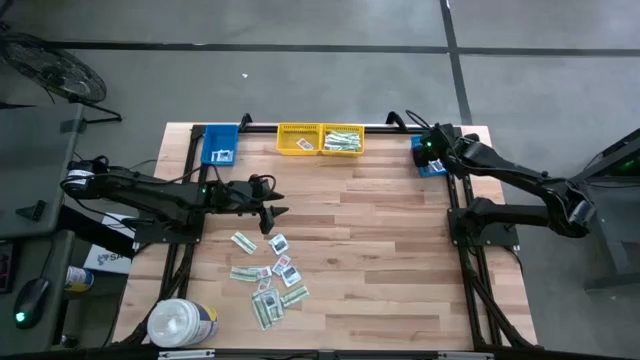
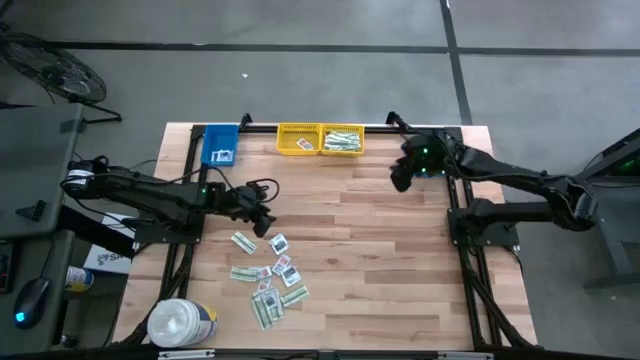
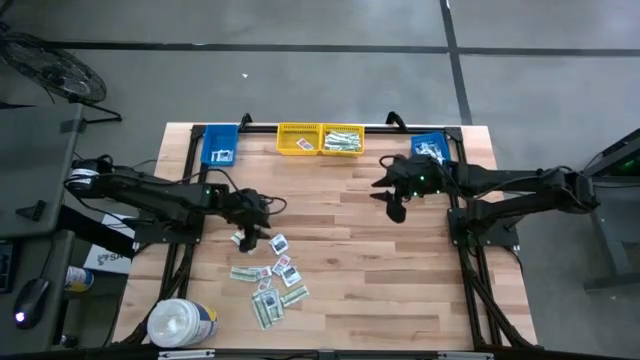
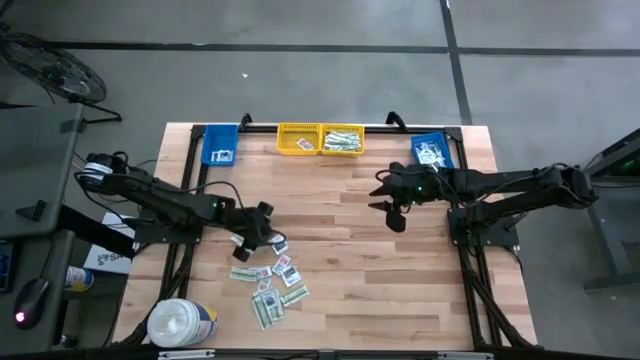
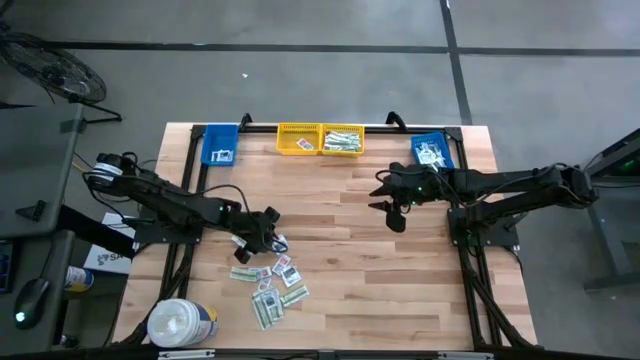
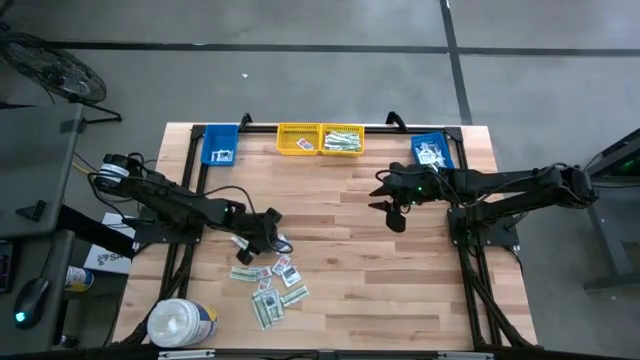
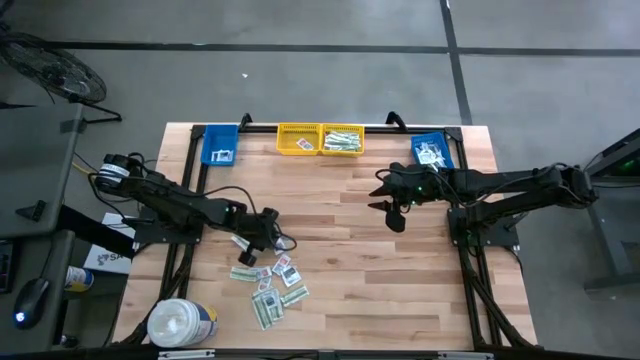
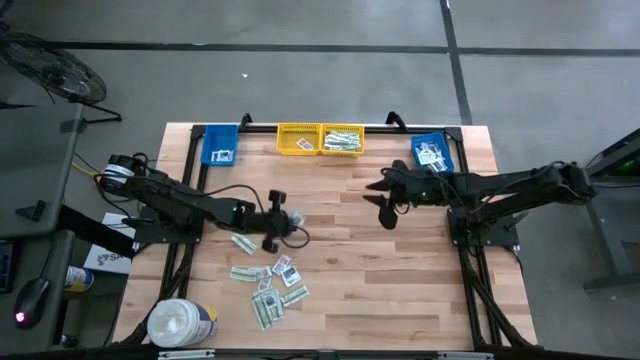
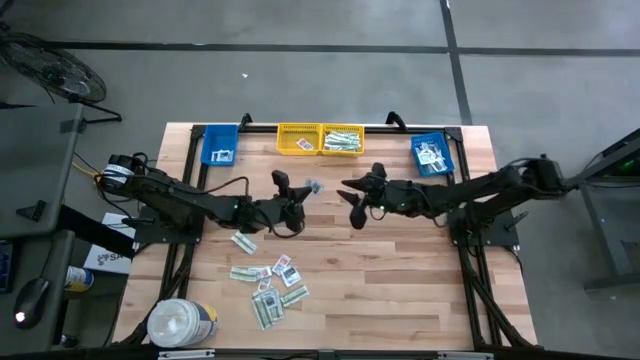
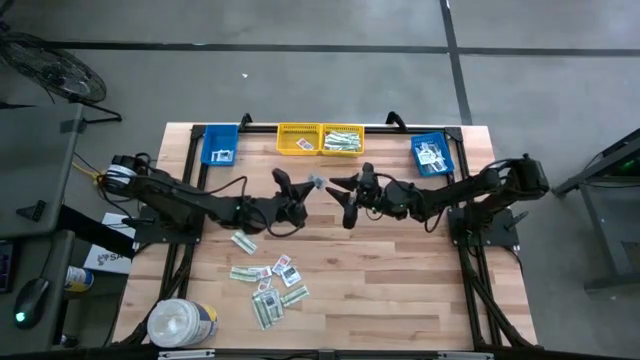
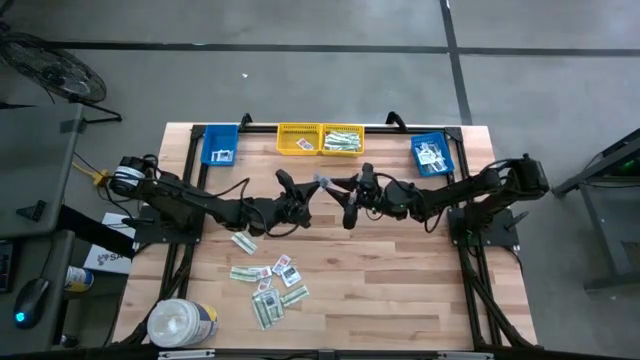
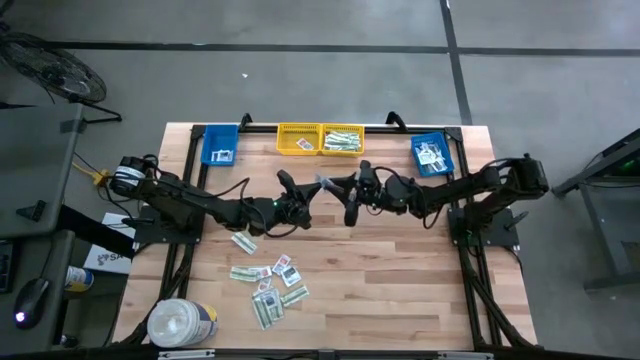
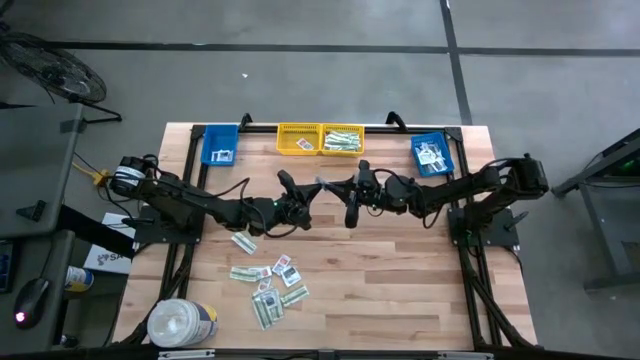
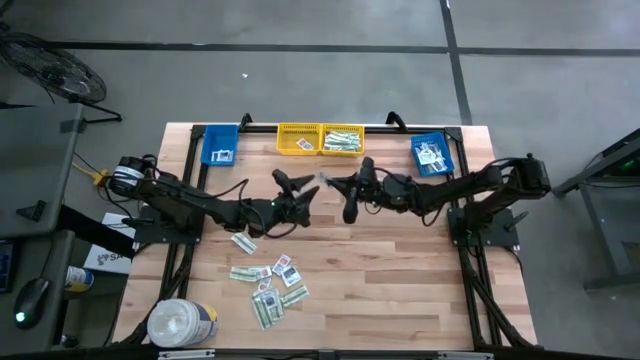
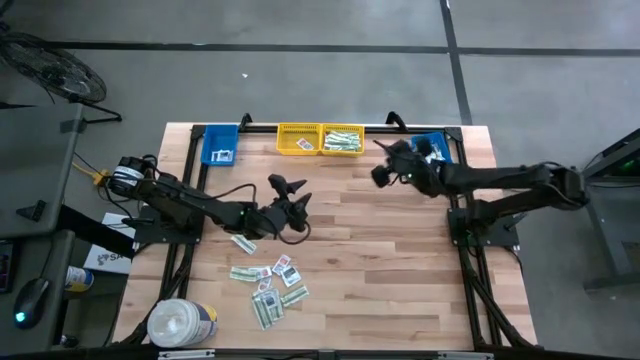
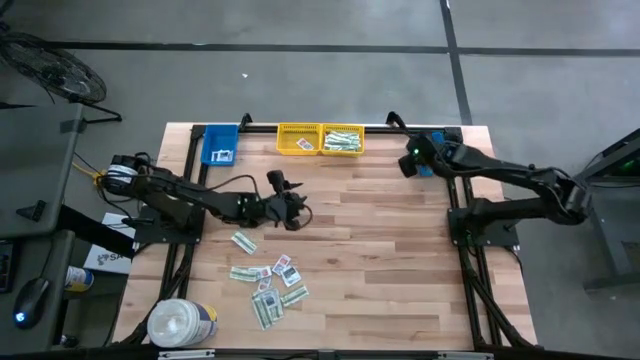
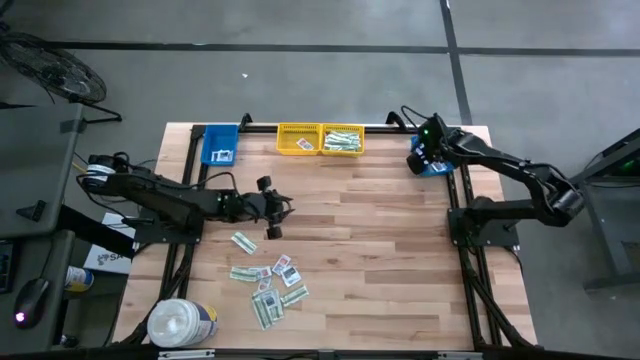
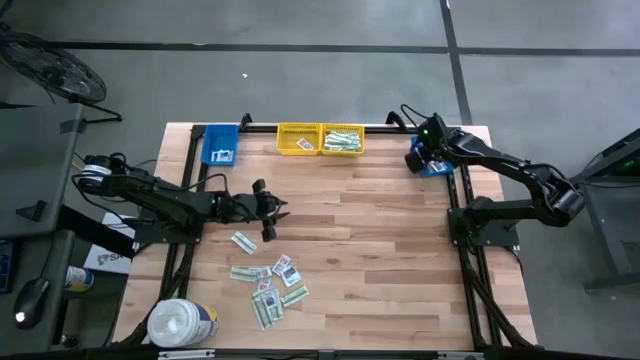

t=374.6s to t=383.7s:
Task: Pick & Place First Aid Supplies
Put the black towelette pack into the right blue bin

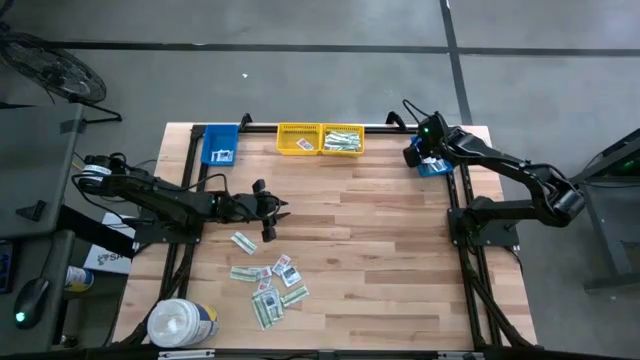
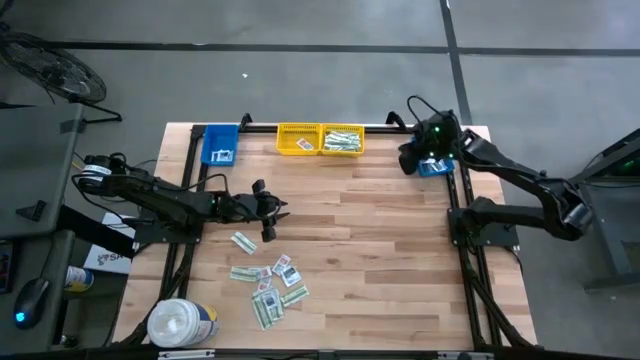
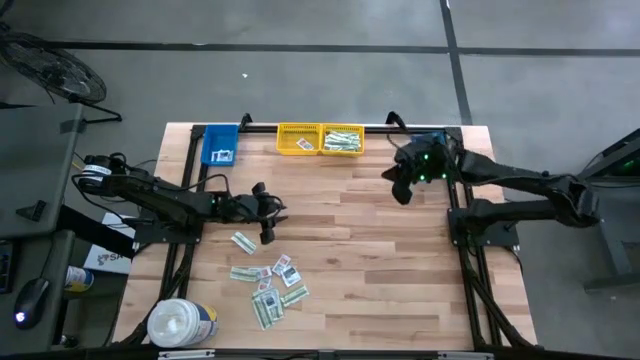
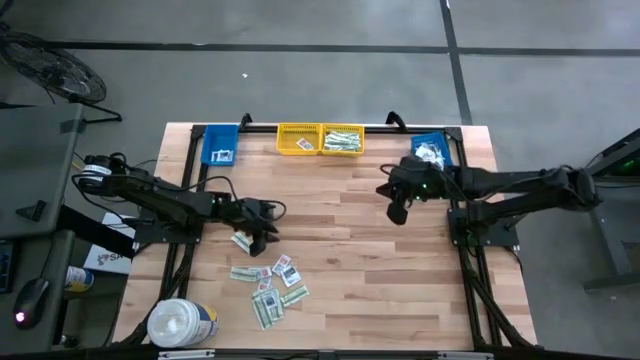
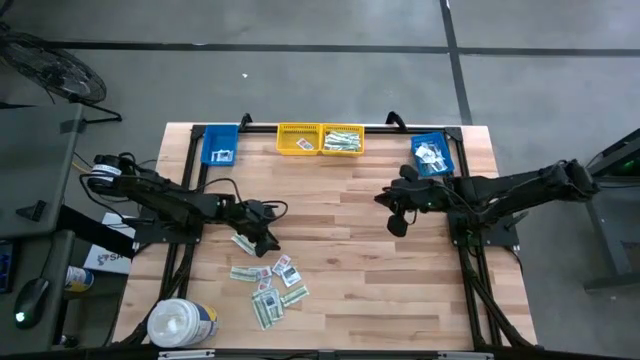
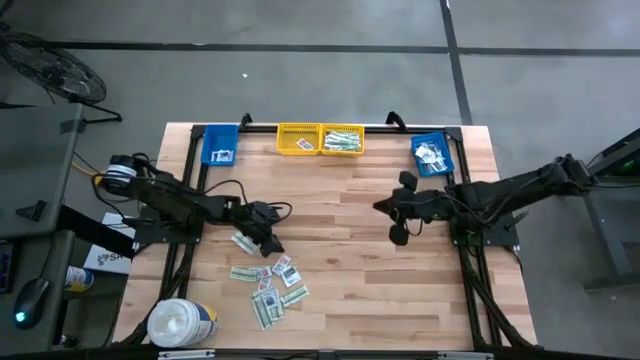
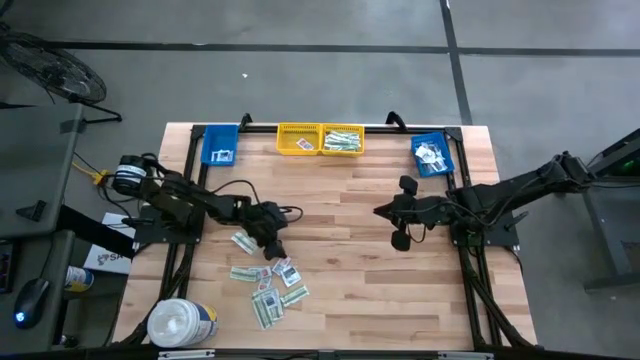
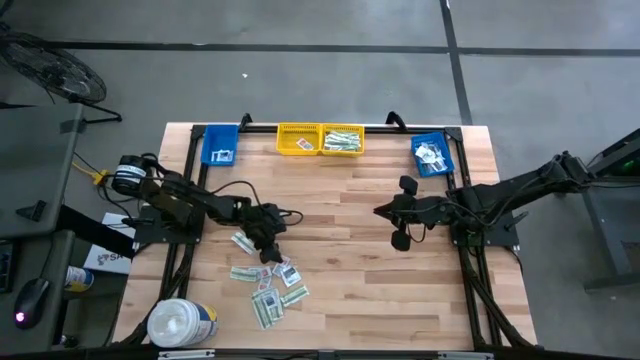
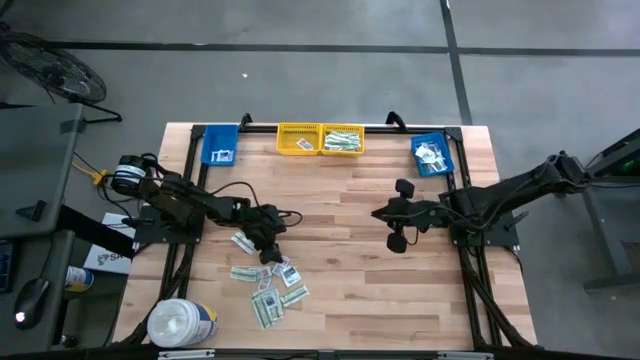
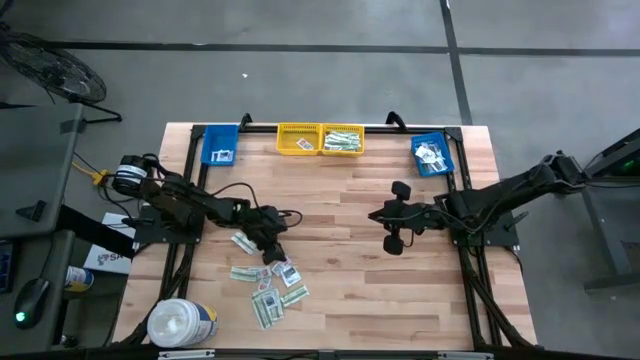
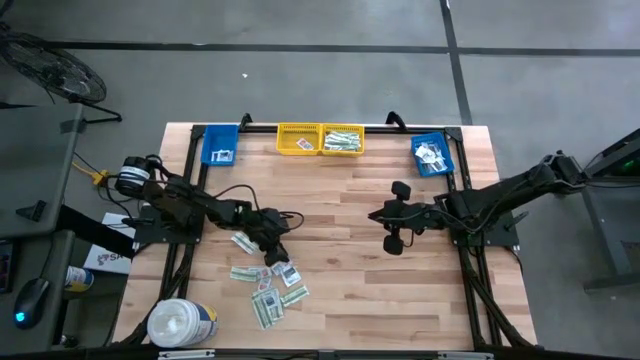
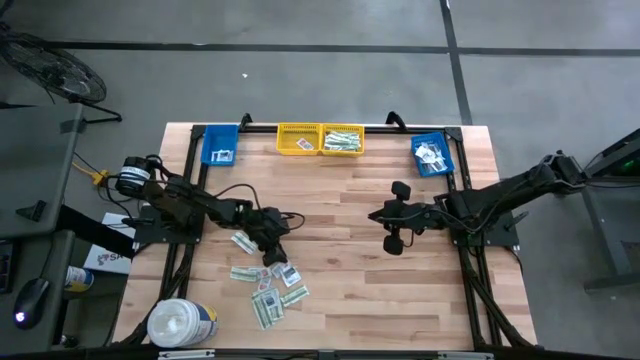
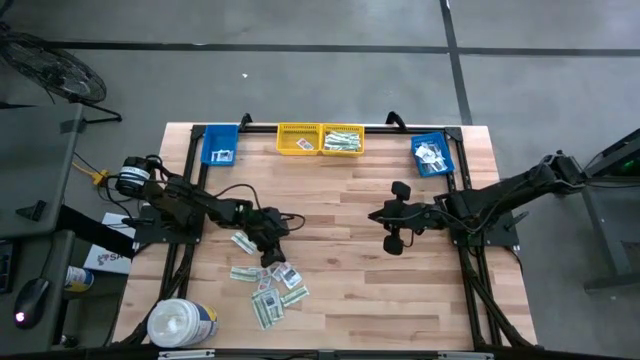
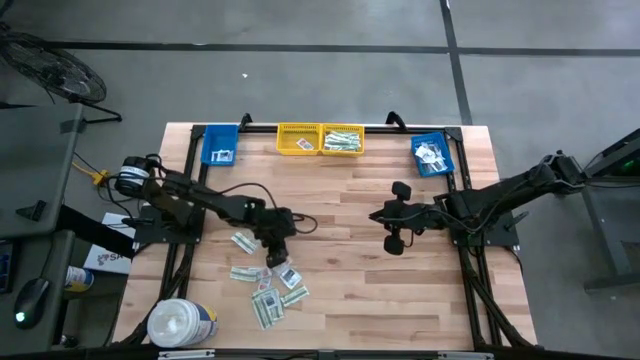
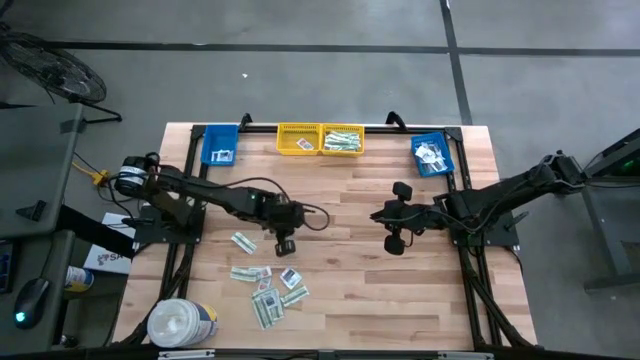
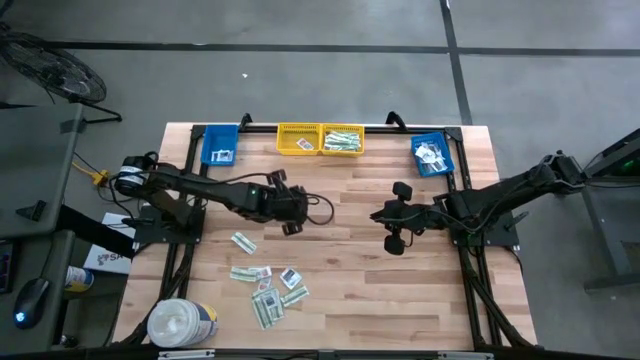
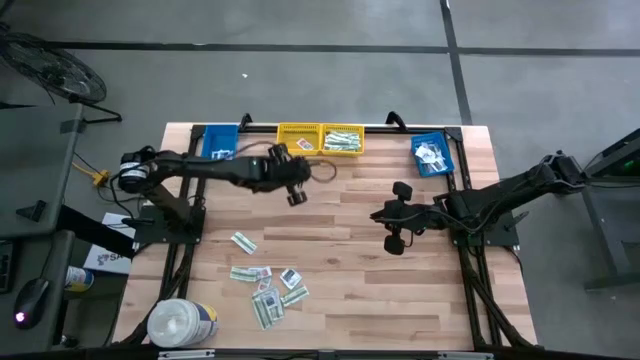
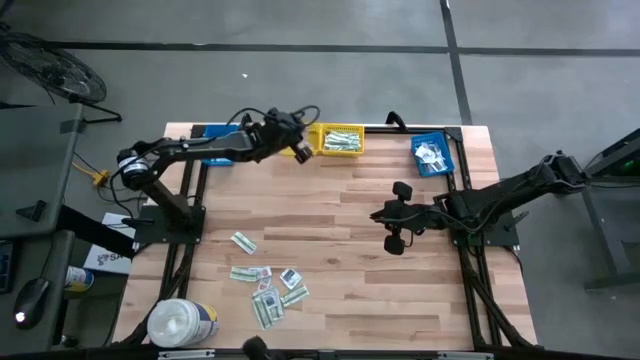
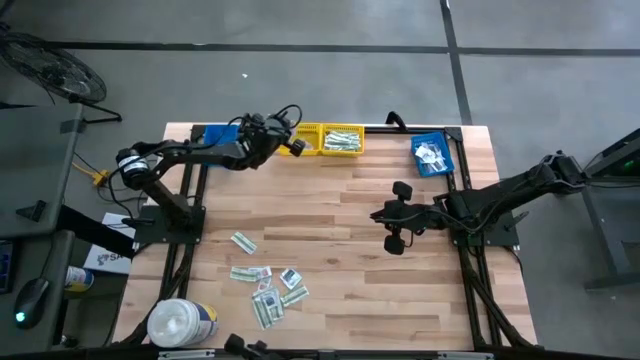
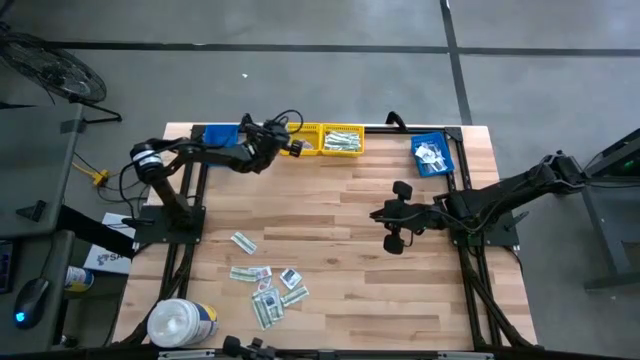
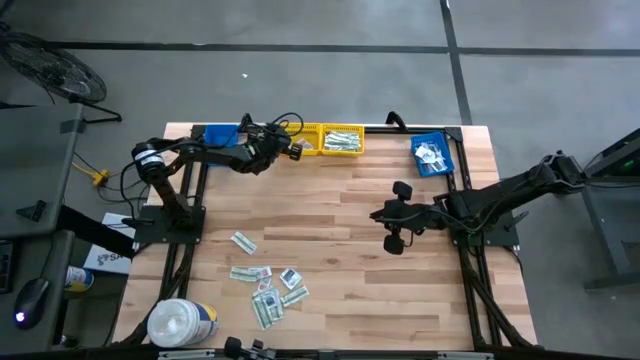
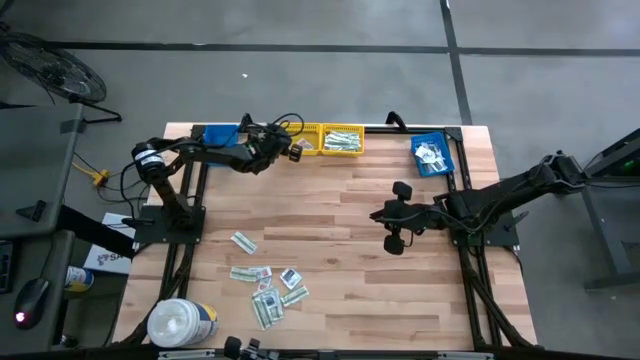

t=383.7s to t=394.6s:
Put the orange ointment pack into the left yellow bin
